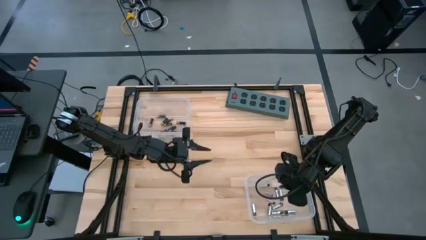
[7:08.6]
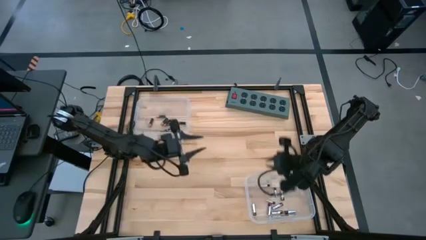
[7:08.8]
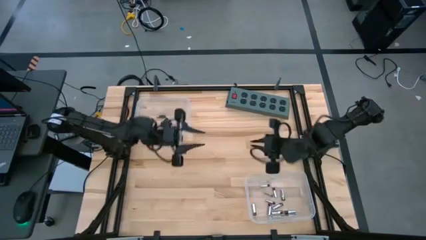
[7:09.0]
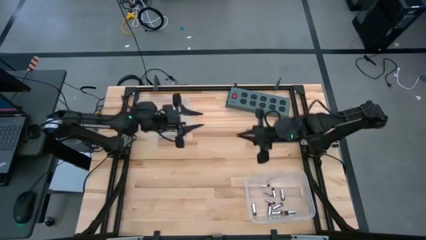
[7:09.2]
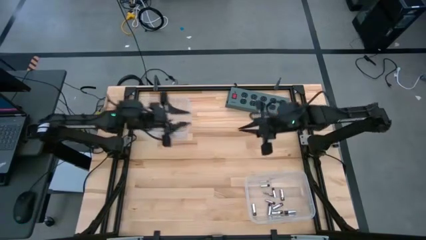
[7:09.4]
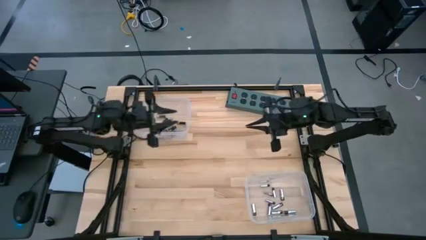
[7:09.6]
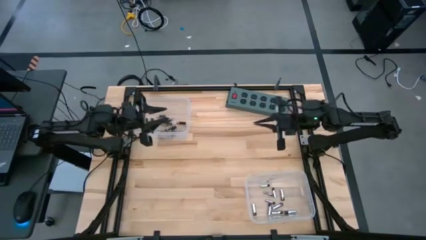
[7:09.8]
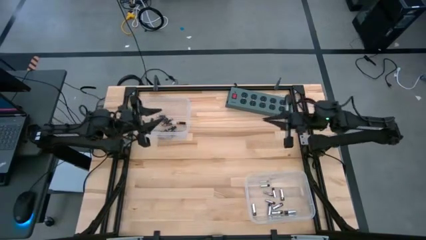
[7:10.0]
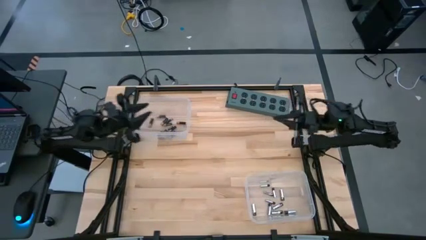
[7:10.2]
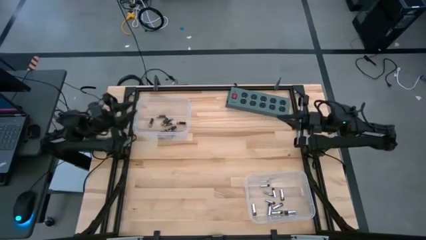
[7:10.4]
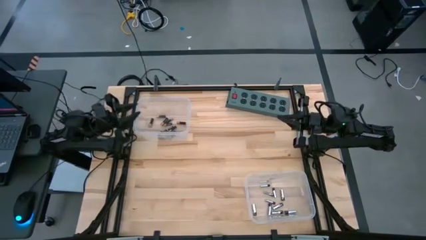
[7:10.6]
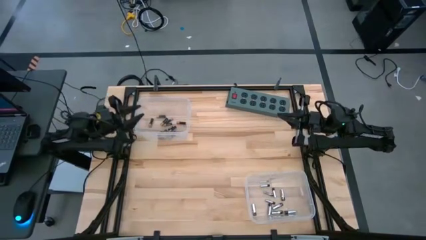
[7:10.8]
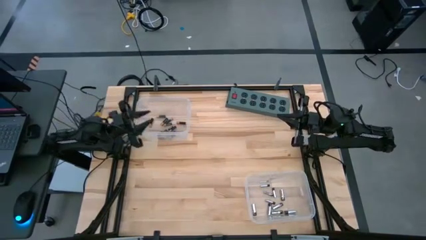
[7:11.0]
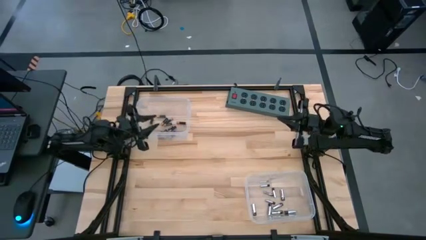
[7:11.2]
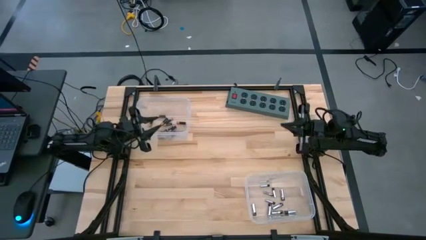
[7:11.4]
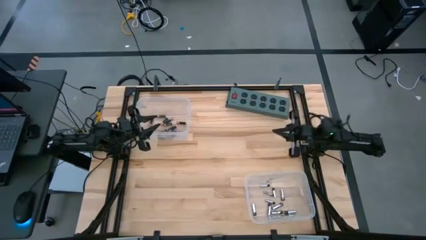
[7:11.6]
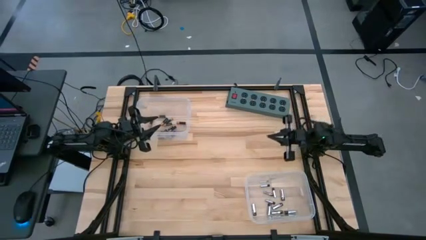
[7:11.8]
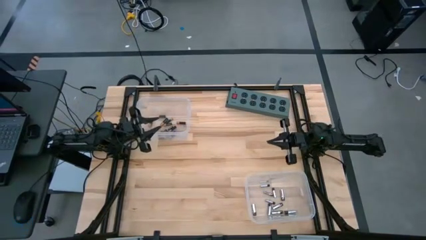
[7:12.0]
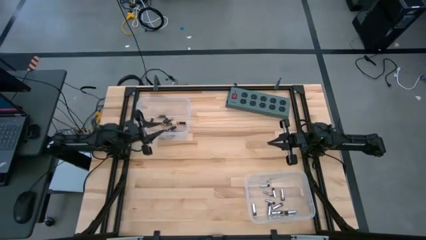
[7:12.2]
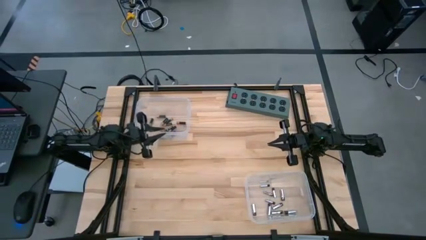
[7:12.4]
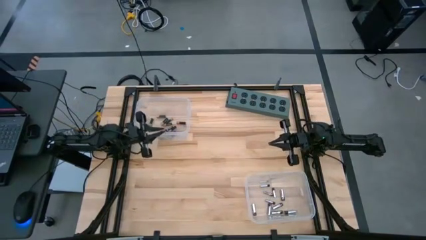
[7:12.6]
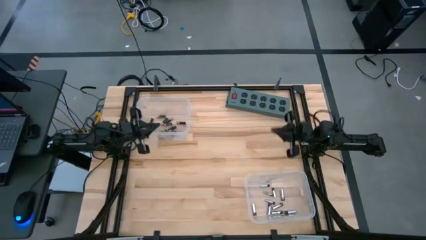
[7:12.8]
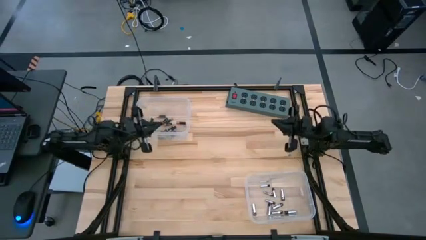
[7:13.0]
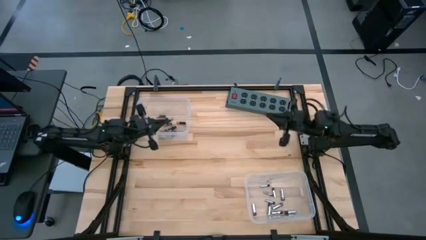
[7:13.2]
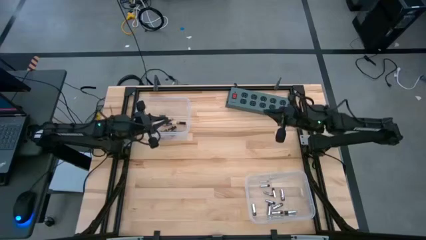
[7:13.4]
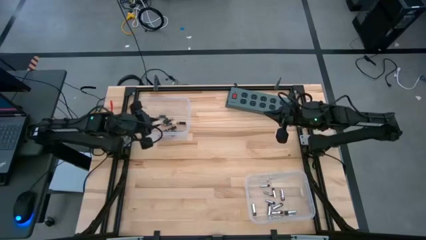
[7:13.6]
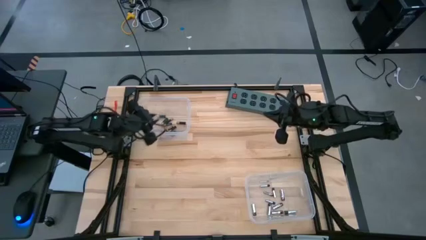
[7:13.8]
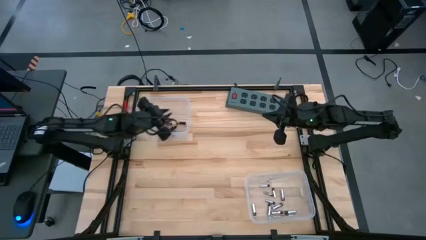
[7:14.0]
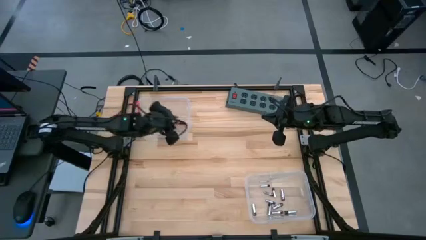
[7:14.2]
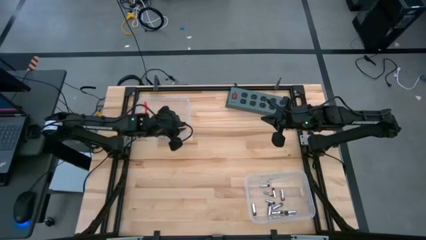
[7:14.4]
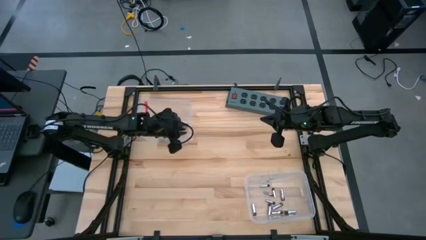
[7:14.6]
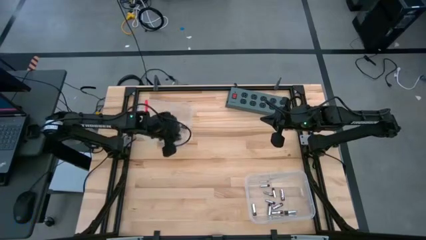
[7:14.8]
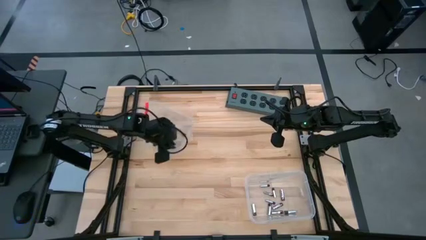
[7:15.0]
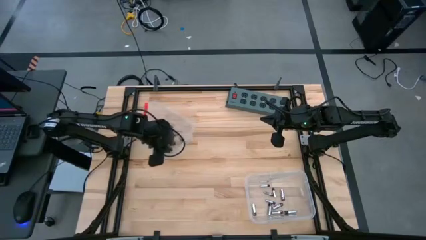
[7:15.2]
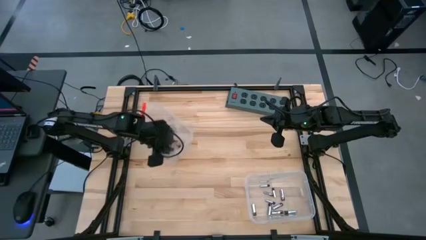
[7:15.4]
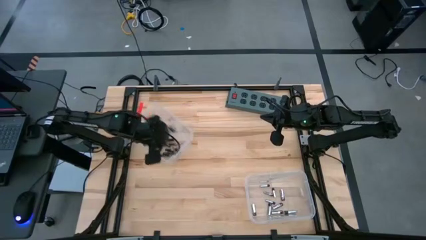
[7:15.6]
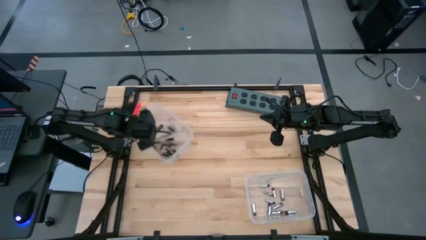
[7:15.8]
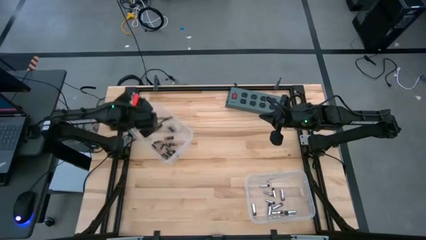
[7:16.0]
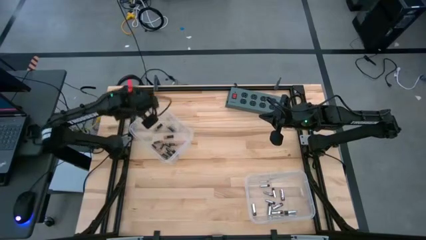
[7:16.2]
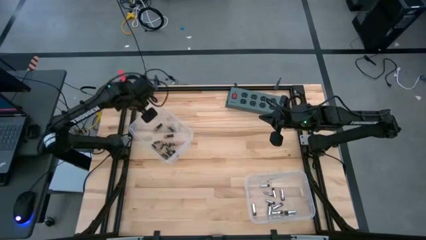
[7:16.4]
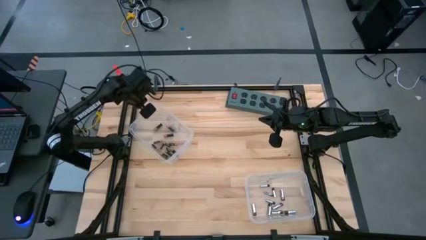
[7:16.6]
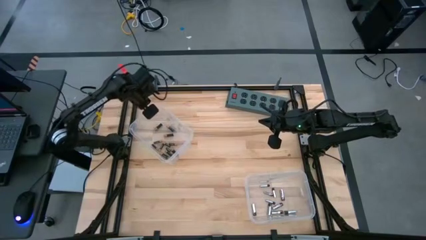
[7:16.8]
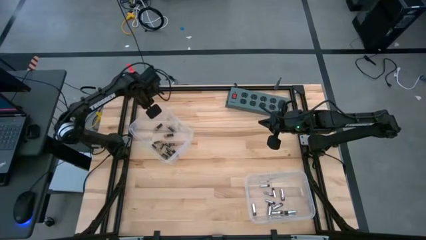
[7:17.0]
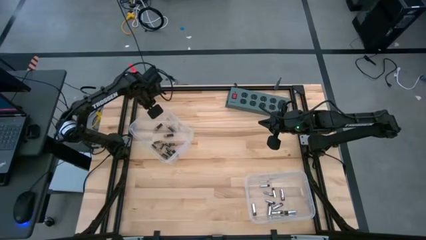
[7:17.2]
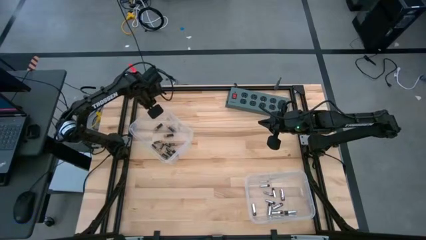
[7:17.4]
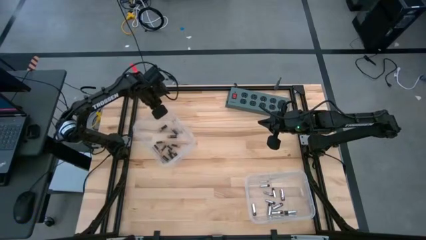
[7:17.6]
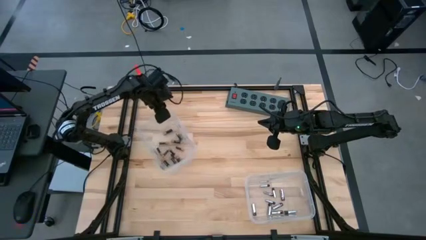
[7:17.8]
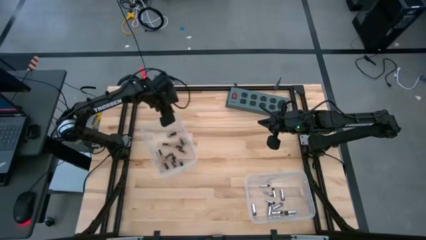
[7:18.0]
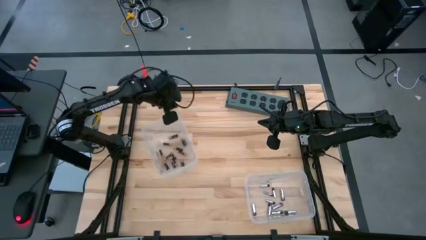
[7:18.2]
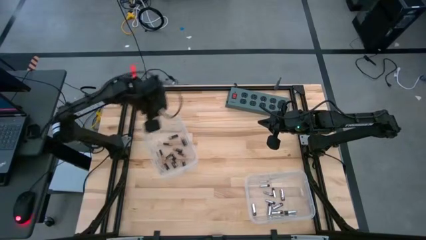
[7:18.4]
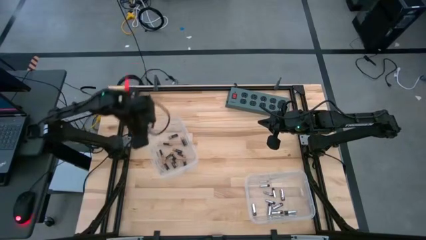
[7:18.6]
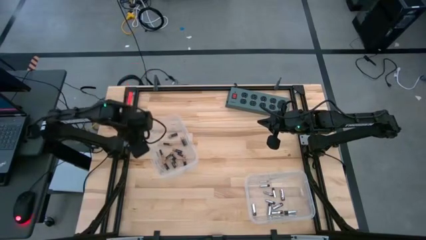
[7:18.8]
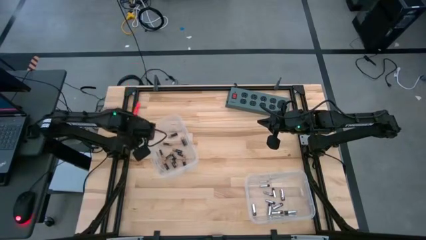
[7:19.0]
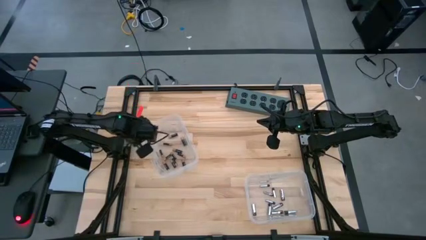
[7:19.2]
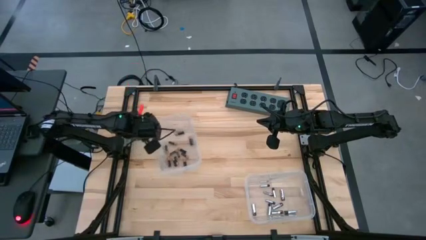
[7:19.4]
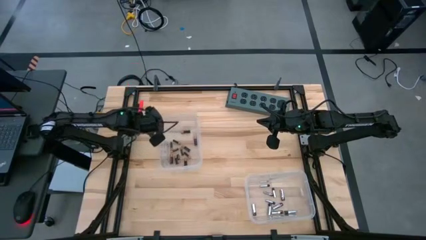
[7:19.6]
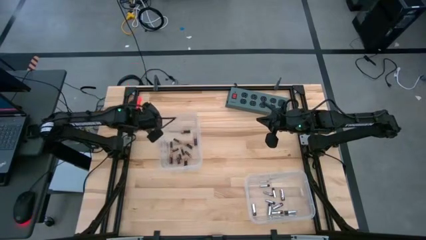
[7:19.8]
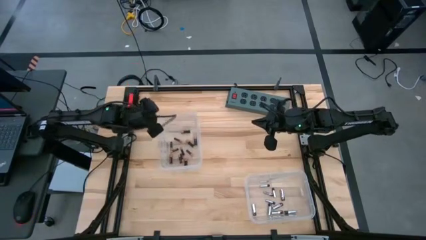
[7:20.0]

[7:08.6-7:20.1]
Task: Sort batteries
Move the top transparent bin to the center

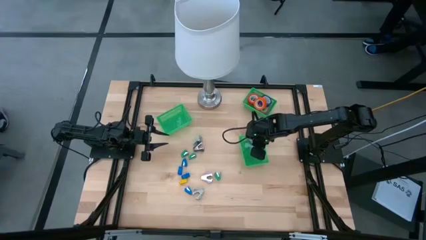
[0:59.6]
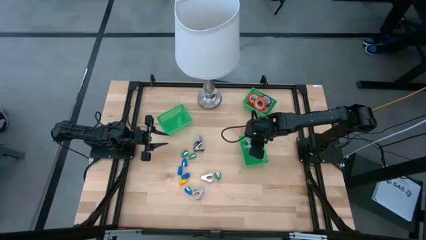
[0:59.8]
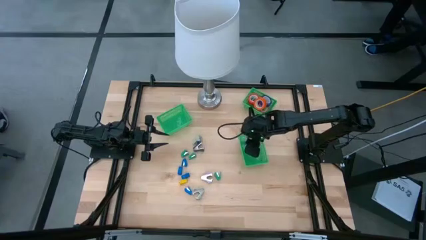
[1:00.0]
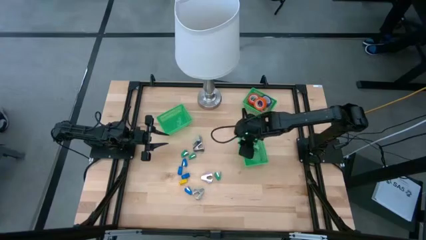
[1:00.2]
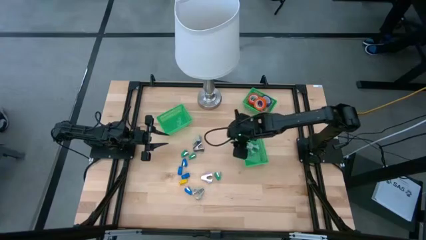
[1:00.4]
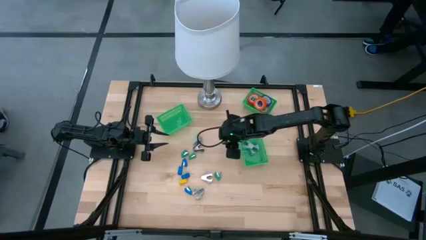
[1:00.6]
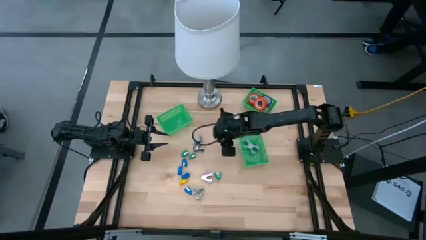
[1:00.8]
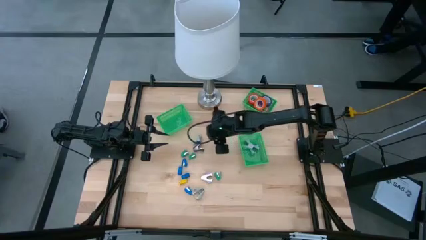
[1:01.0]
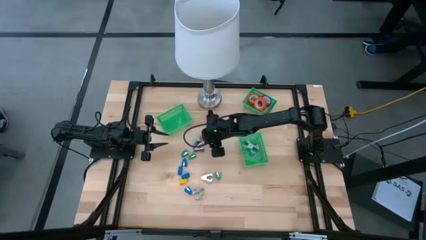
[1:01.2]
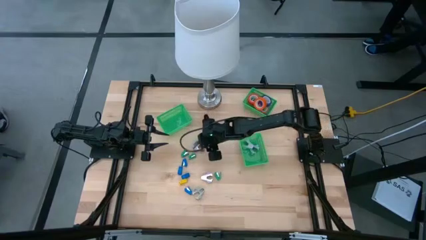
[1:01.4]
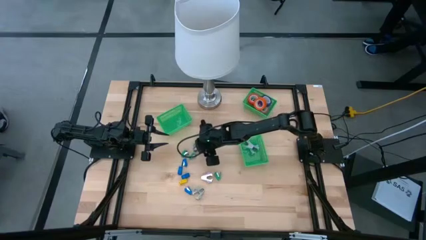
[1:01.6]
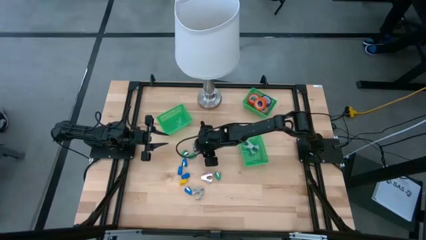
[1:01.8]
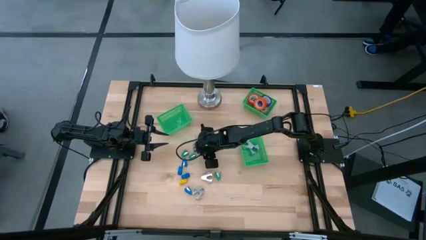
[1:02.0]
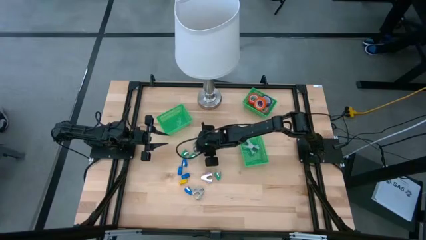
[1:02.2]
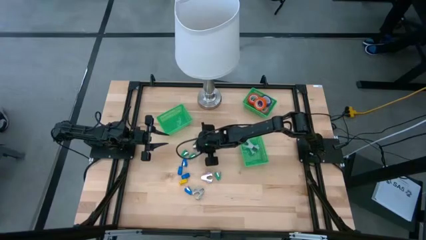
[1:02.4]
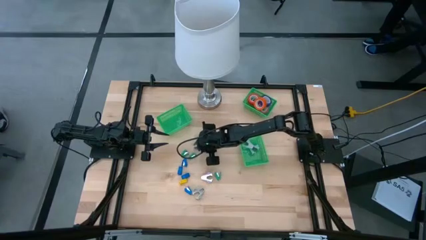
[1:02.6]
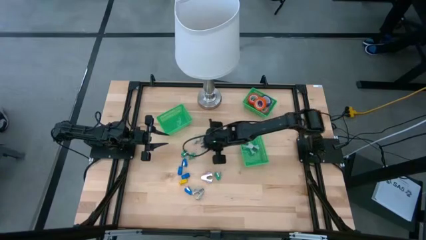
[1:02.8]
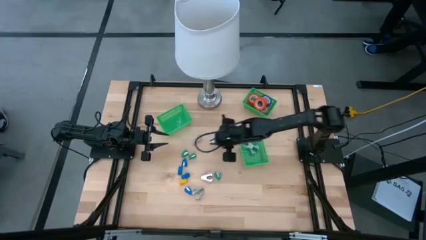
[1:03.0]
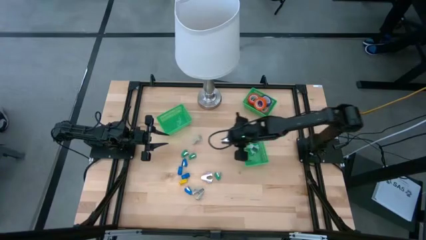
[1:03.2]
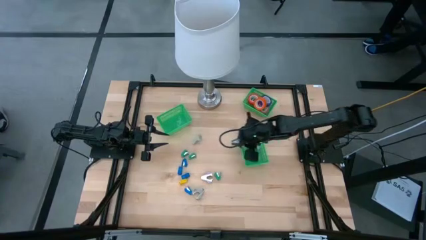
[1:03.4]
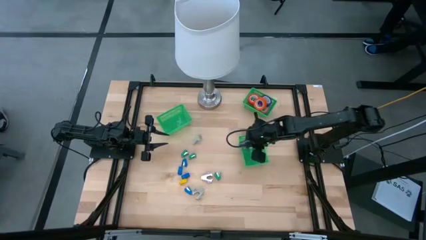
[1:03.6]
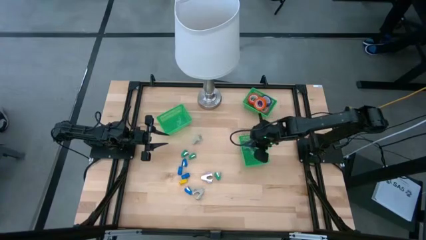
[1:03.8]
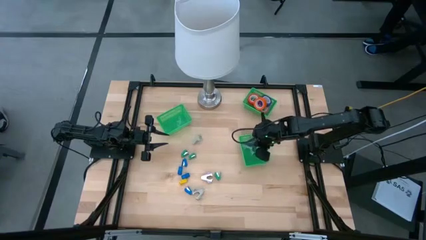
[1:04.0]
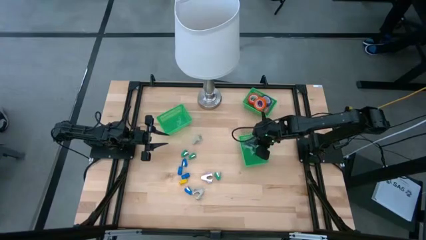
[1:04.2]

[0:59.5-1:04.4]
Task: Pick and place Stapler, Stapler remover, tape
Put the black staple remover into the bottom right green bin

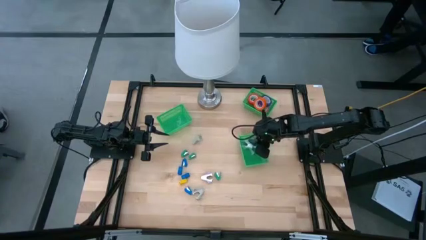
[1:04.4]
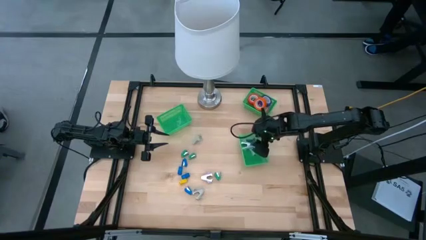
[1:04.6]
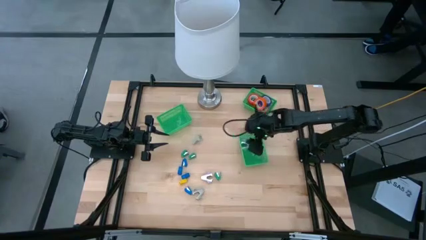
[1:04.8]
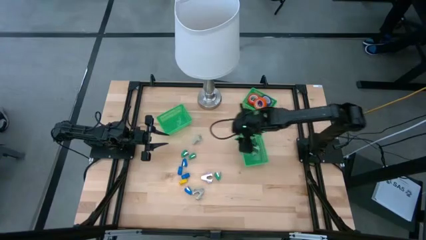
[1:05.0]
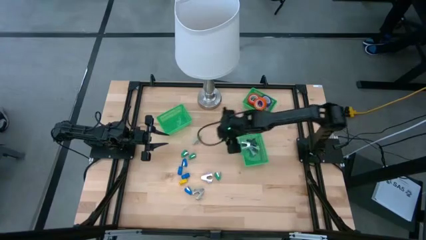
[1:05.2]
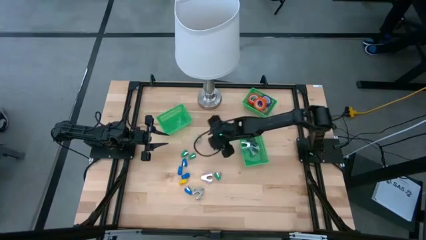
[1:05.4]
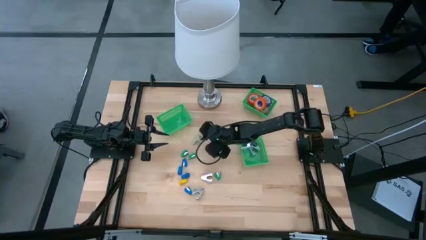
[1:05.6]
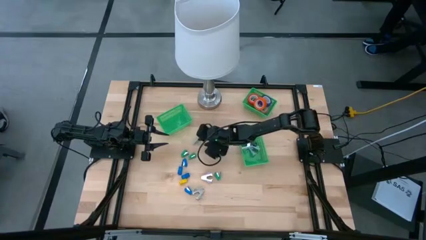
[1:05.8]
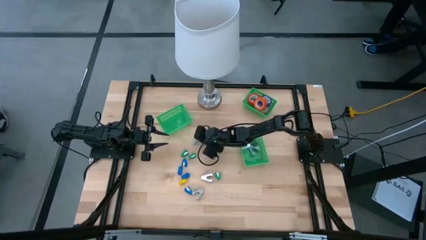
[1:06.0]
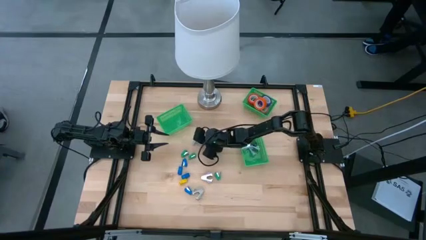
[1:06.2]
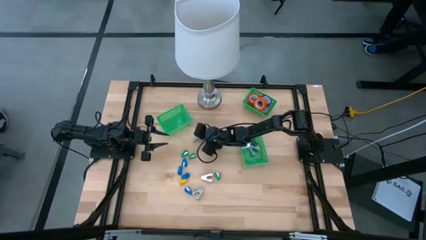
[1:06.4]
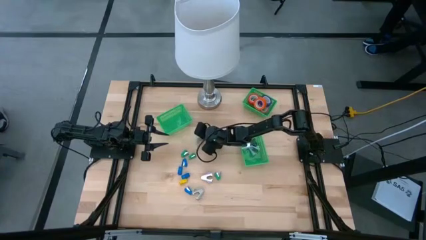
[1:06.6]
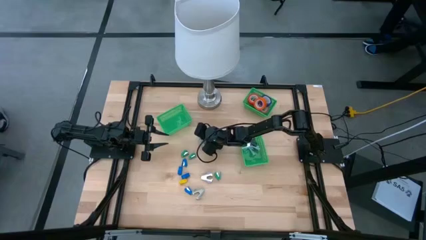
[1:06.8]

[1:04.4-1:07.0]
Put the gray staple remover into the bottom right green bin
